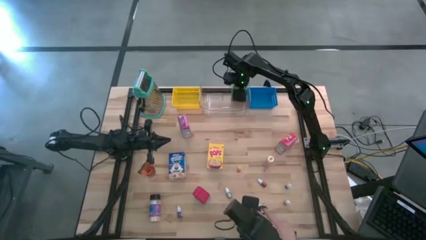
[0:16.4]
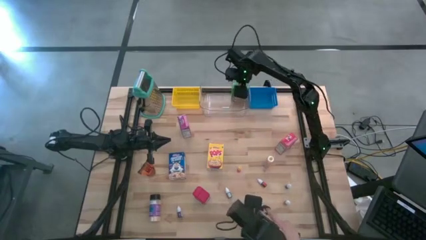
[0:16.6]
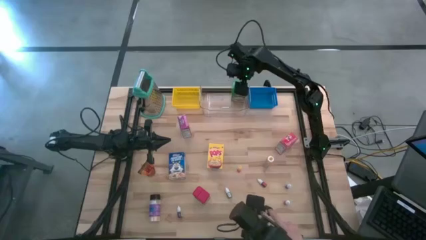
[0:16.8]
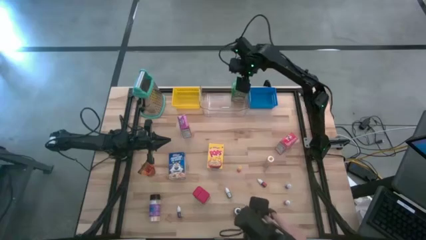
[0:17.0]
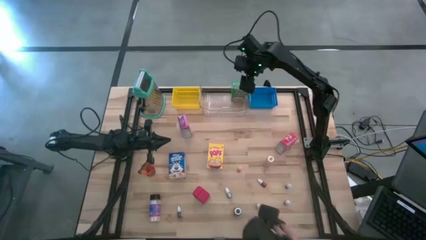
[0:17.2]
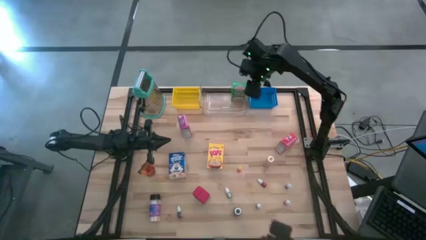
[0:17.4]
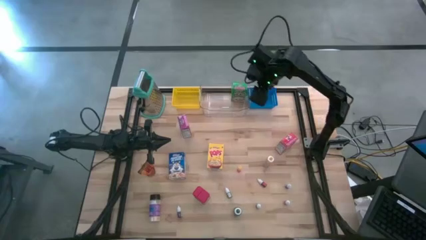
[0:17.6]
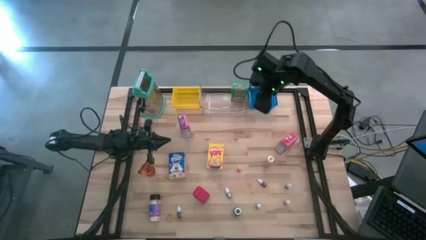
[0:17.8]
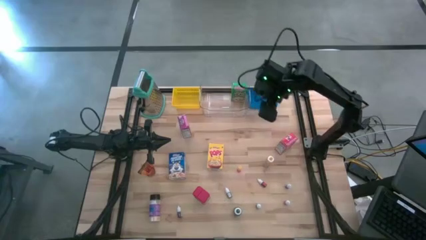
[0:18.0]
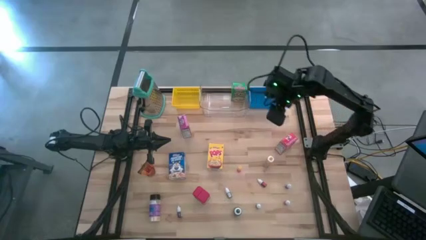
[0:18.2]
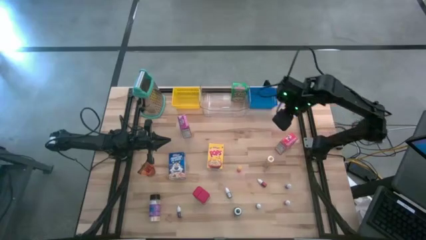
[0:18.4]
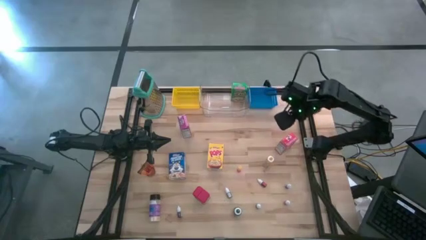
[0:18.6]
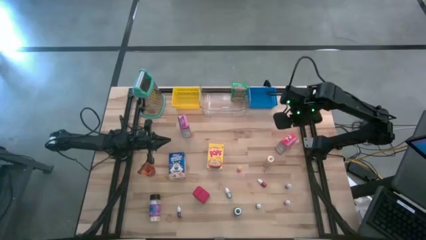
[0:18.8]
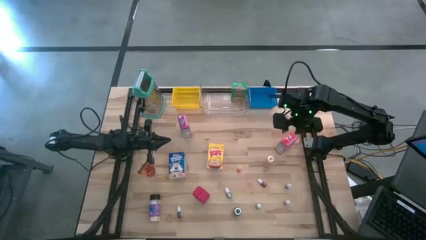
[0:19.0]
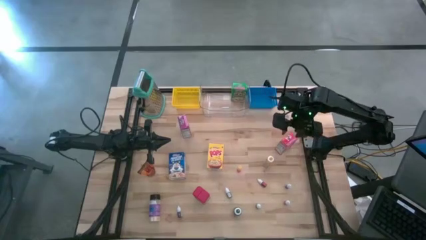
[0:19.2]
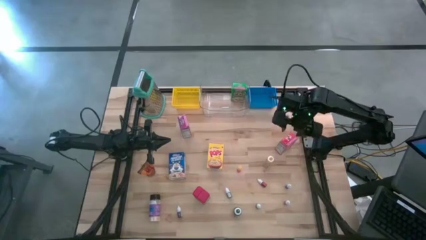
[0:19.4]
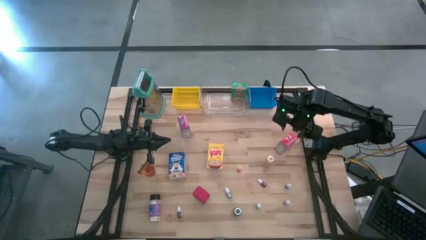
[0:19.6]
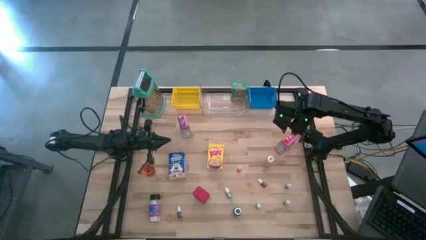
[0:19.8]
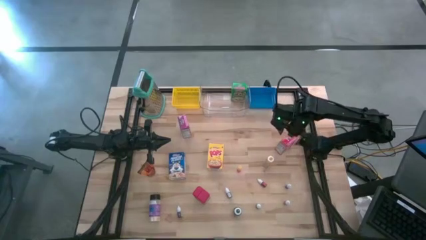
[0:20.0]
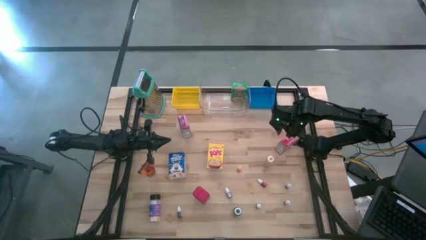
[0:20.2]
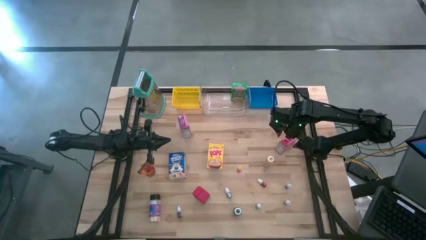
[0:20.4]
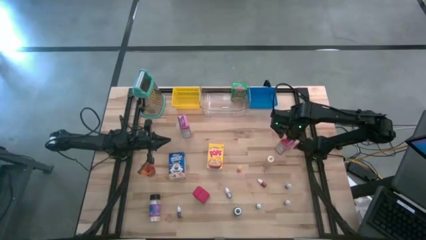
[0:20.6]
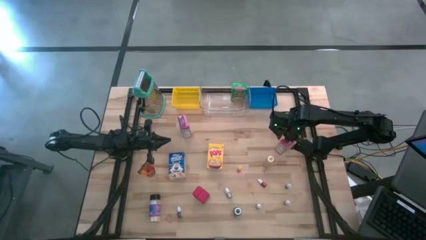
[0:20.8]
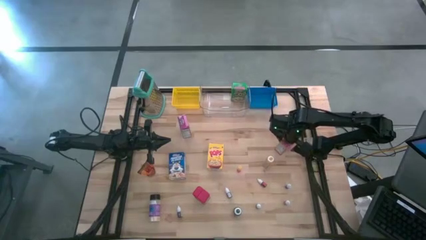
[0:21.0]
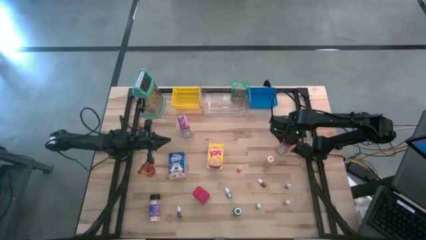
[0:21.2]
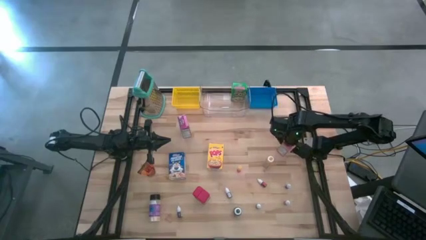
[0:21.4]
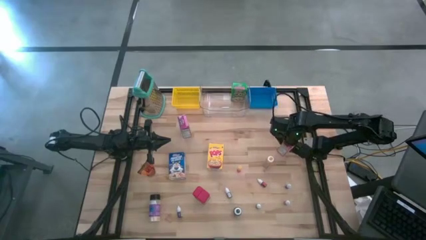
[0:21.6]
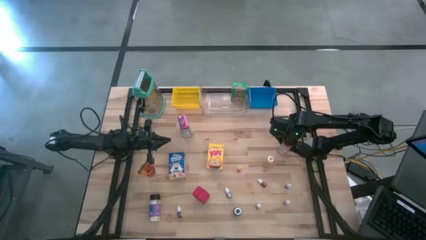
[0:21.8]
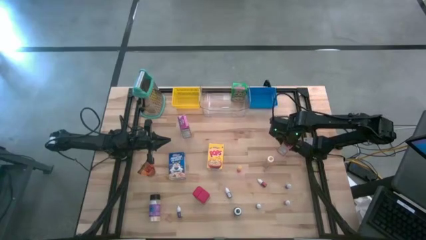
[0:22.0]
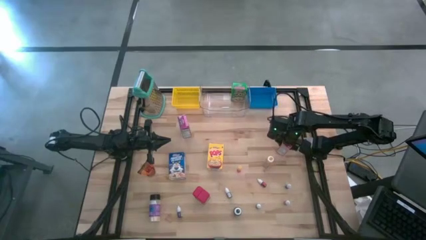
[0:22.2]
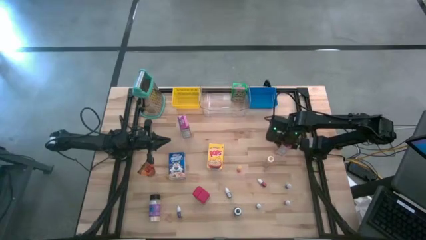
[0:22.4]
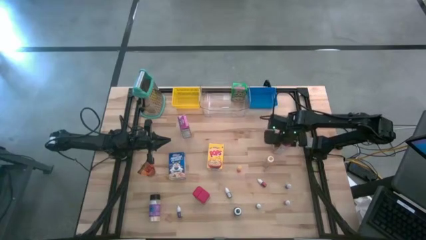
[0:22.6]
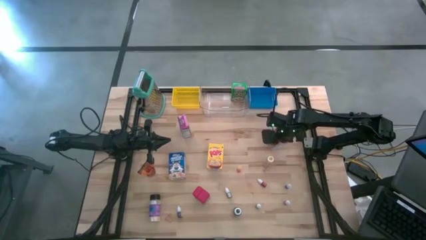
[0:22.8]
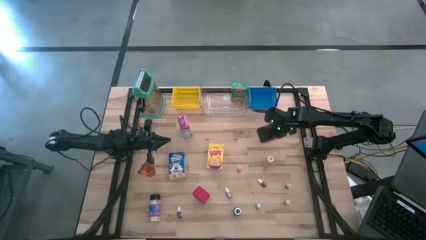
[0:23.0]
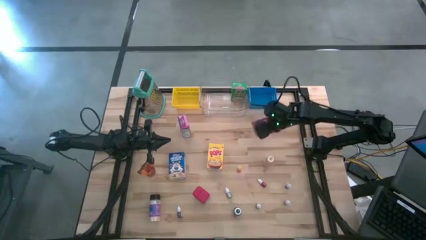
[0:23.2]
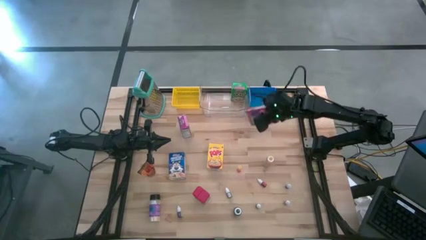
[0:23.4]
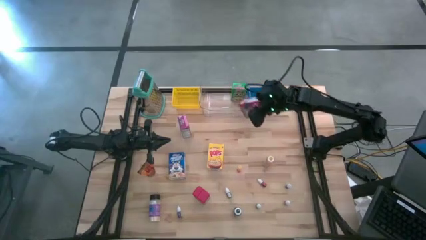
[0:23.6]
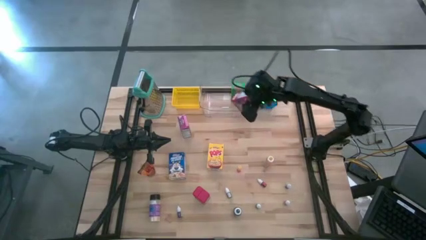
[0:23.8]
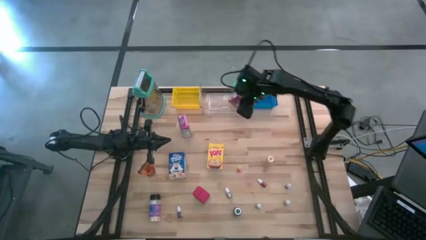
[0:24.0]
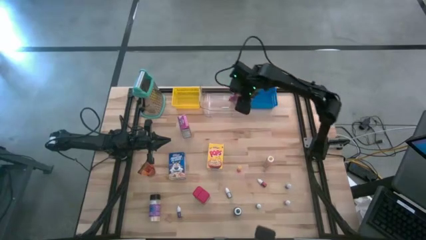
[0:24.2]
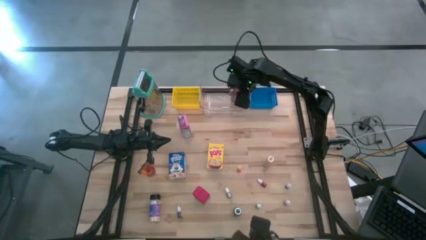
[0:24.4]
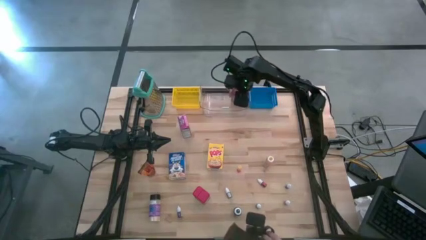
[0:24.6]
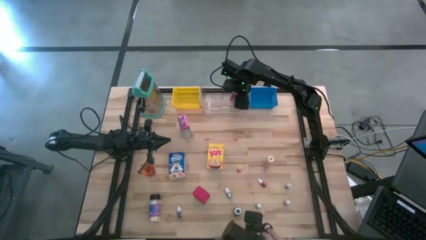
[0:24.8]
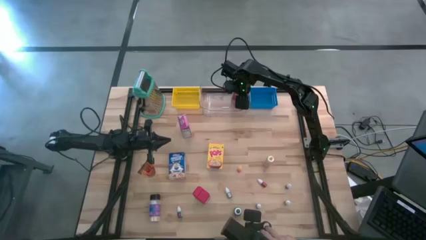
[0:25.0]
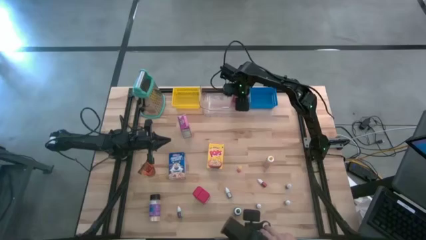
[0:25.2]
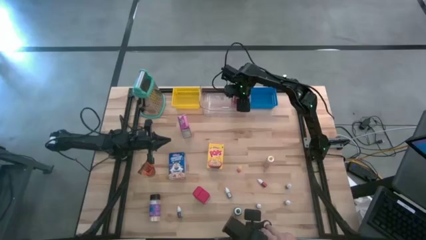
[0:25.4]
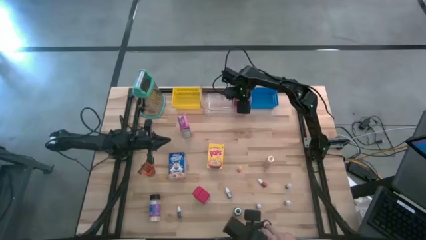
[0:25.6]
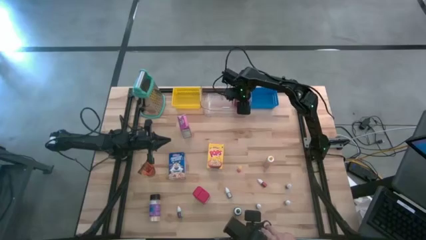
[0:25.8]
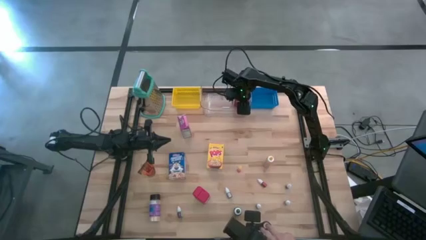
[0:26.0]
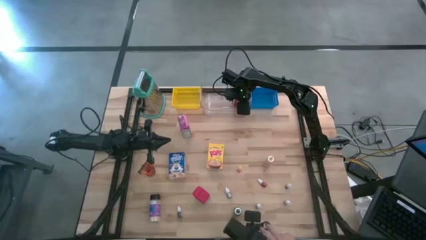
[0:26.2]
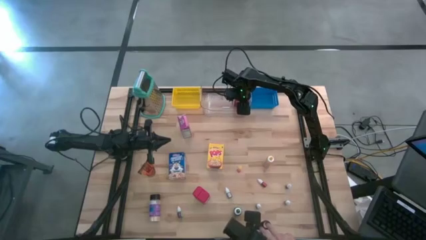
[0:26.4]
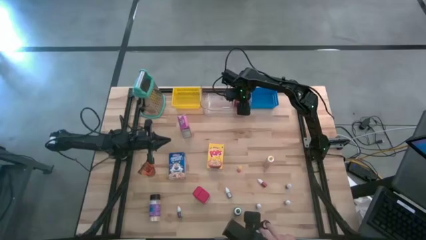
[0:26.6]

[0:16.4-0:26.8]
Task: Pick & Place Kitchen Items
Put the red cereal box into the transparent bin
